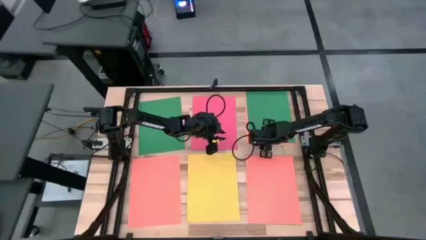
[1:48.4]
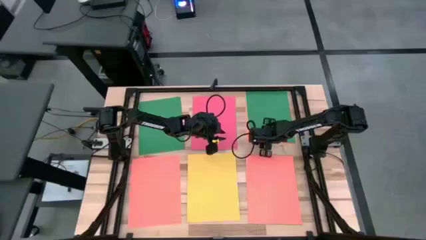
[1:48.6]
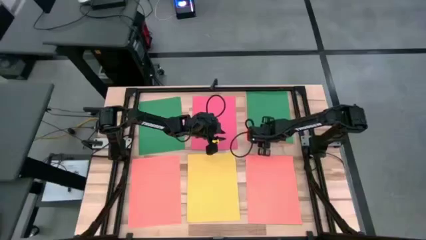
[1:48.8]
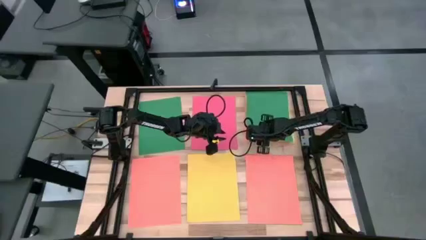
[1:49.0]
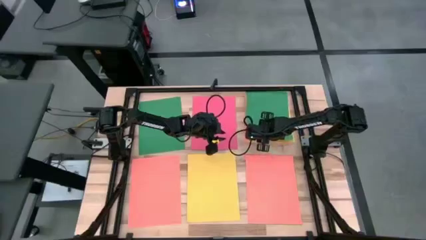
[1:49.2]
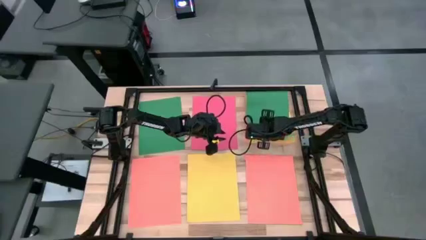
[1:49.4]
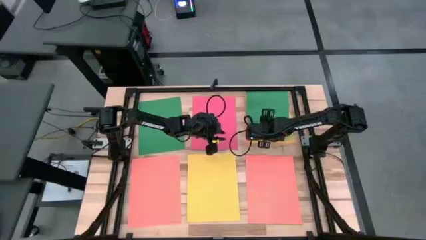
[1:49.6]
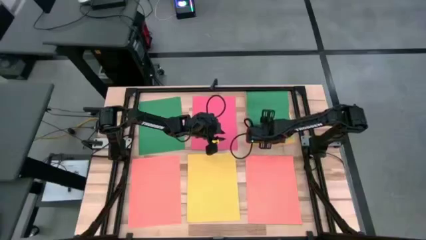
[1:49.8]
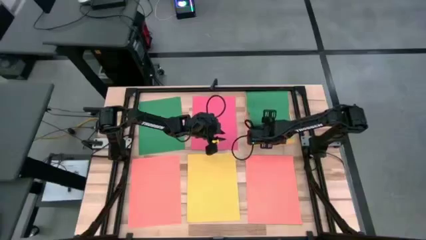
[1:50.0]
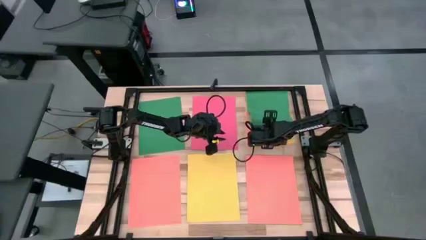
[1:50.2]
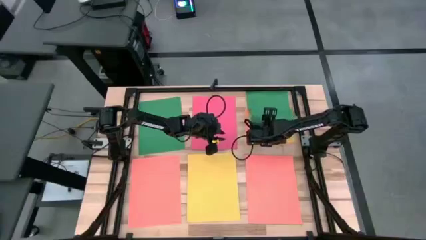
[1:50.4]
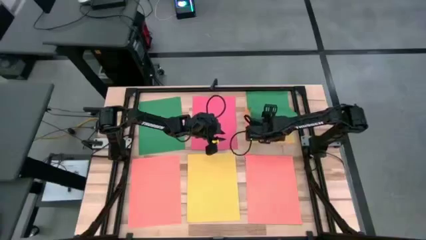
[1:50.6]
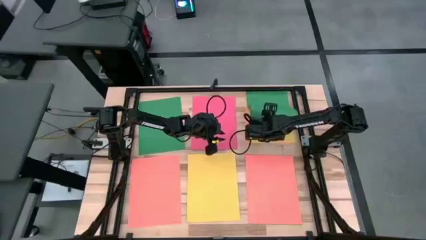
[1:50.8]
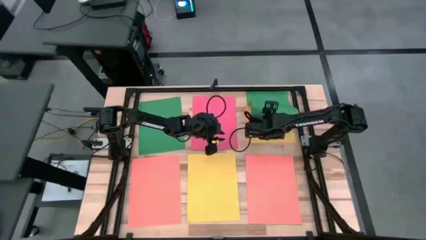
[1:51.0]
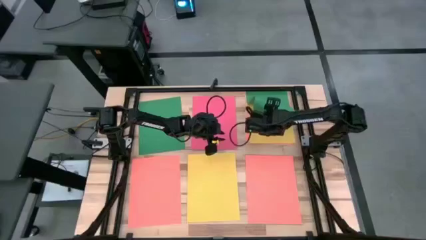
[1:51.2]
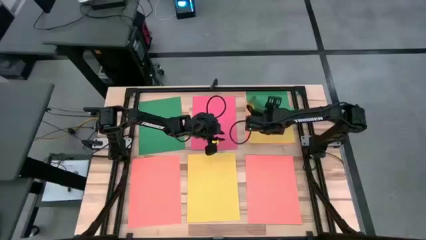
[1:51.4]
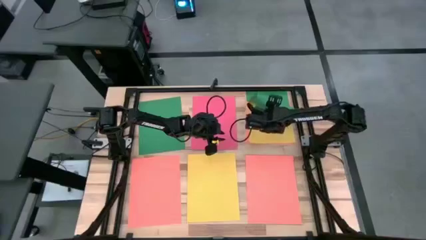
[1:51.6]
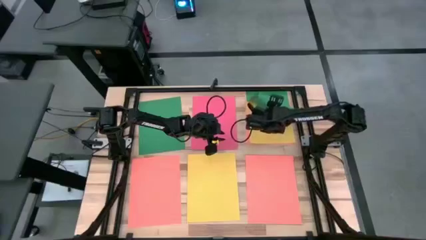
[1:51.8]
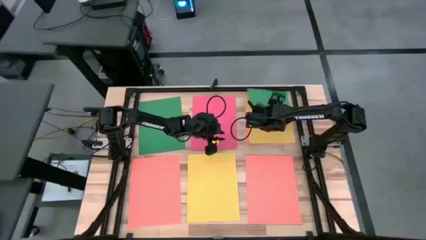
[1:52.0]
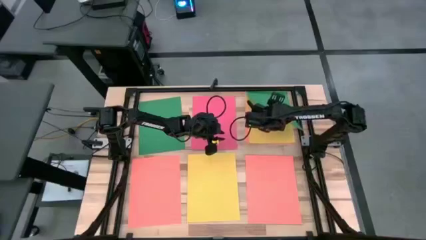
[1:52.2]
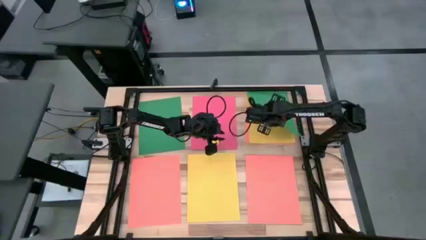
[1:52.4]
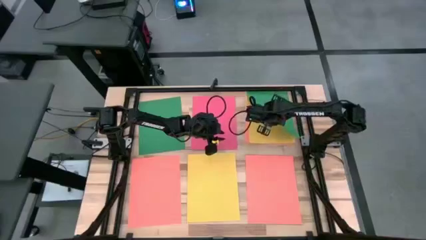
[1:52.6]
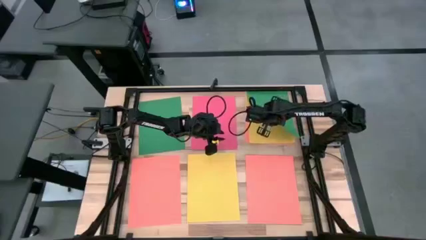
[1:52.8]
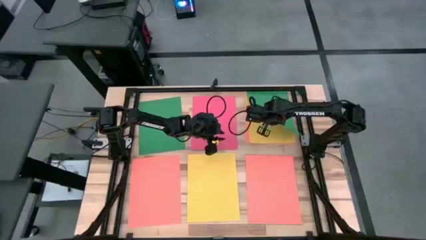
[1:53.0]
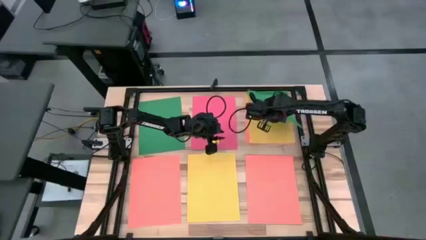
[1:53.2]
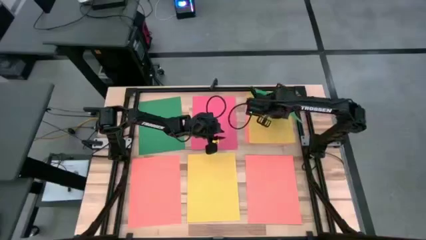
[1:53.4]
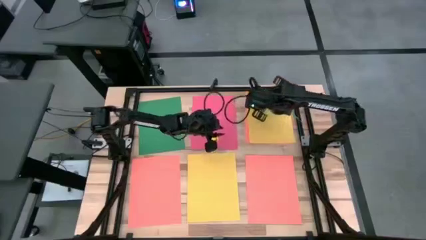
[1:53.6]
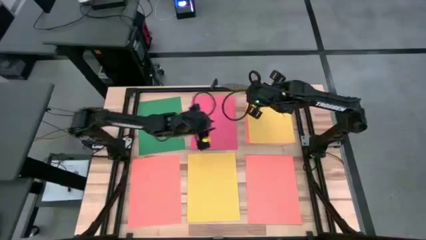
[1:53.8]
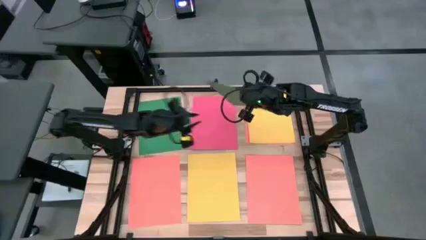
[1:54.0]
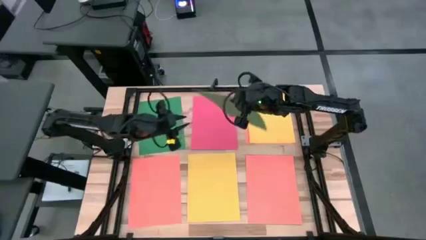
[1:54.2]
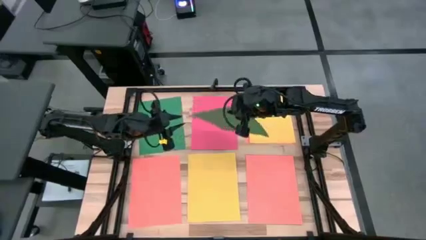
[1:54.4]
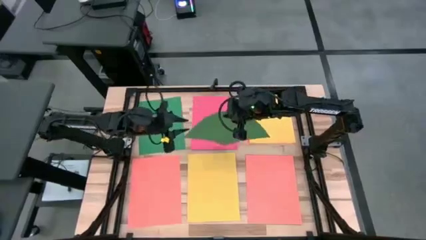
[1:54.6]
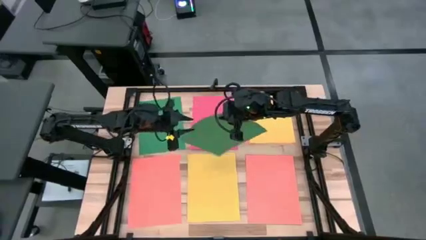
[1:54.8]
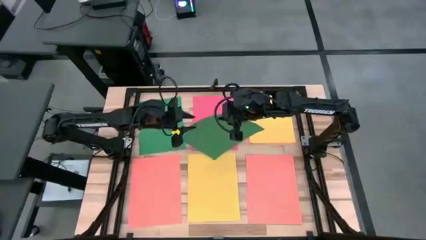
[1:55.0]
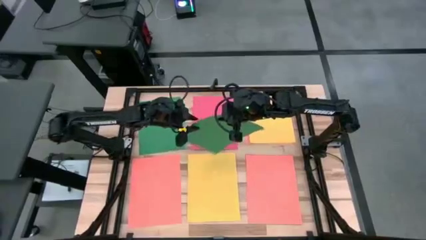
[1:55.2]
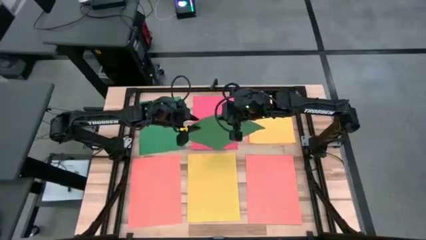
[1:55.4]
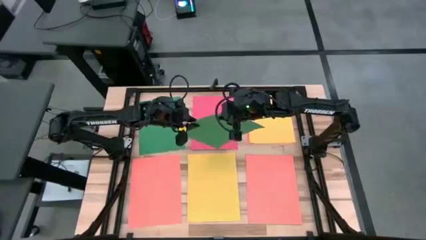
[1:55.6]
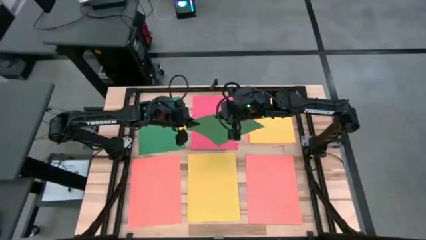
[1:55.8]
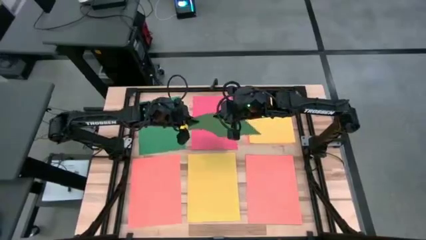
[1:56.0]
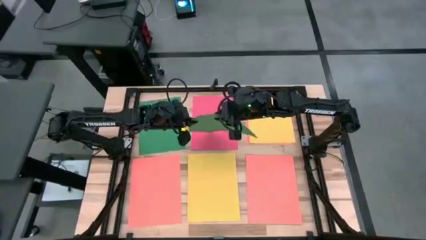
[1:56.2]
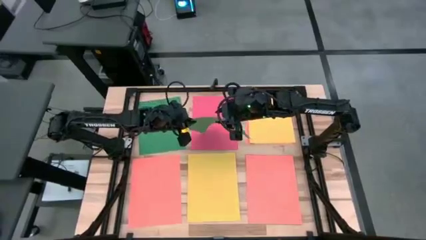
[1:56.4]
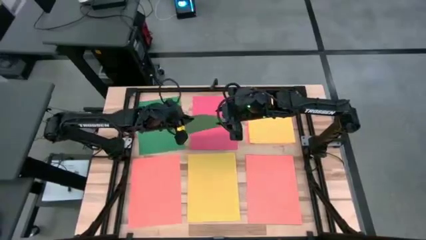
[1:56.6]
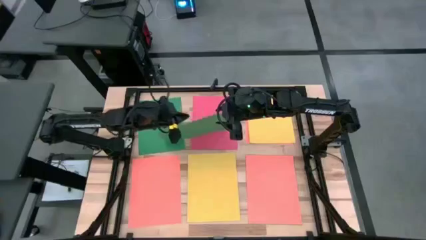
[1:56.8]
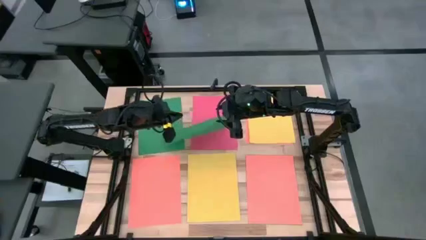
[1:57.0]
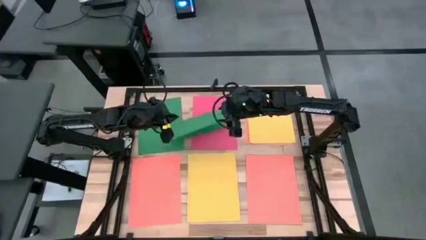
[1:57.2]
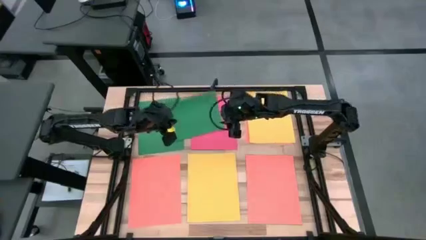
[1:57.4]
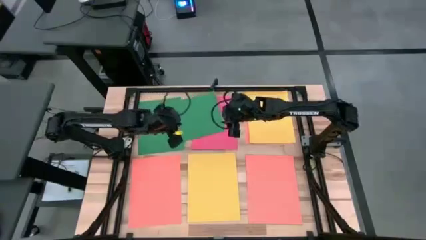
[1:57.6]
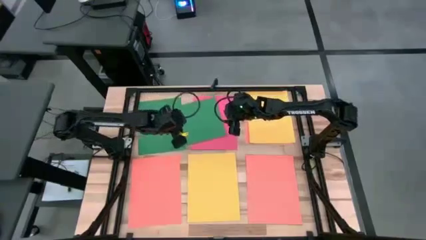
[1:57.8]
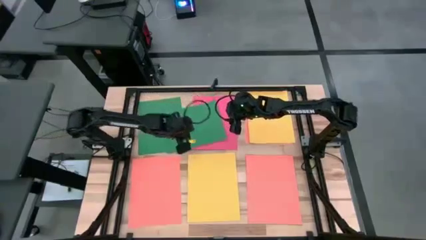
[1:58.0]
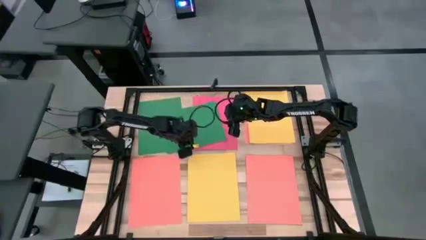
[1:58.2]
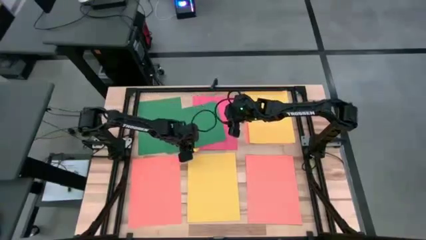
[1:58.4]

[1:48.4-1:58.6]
Task: Organize paper
Stack the green paper on top of the green paper
